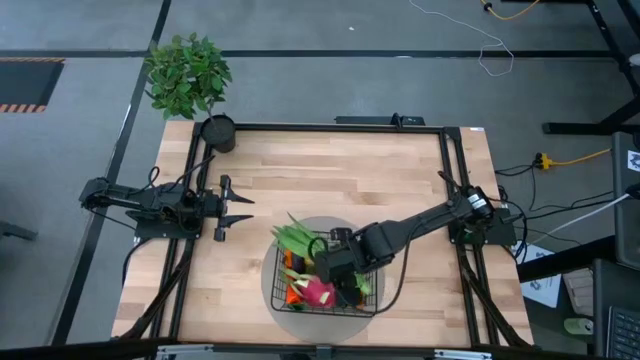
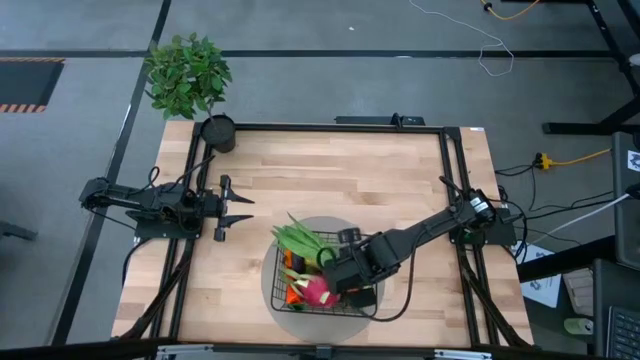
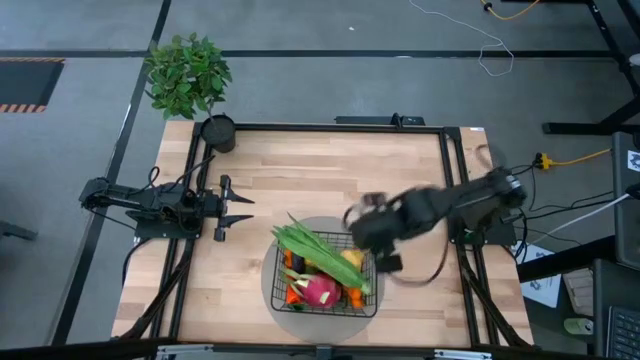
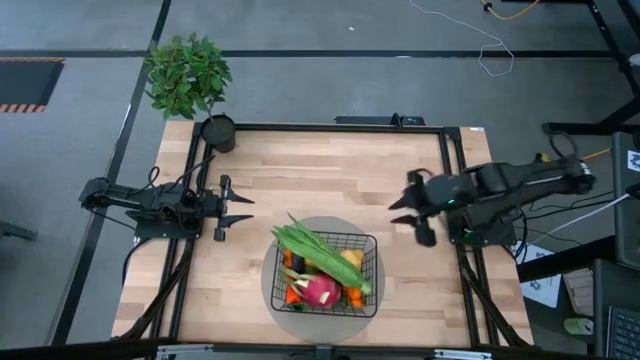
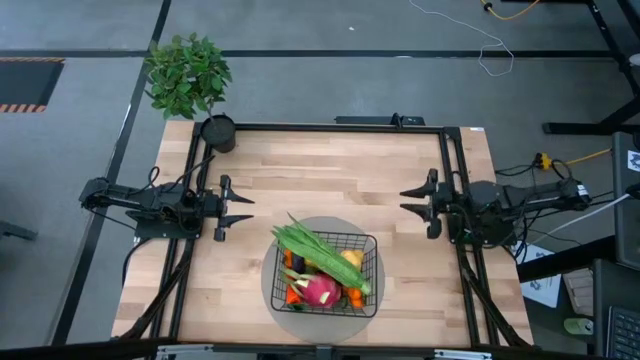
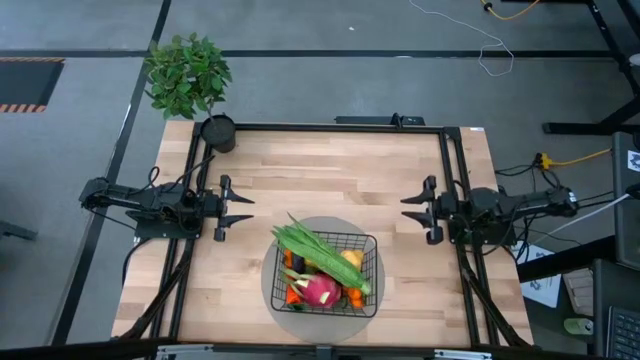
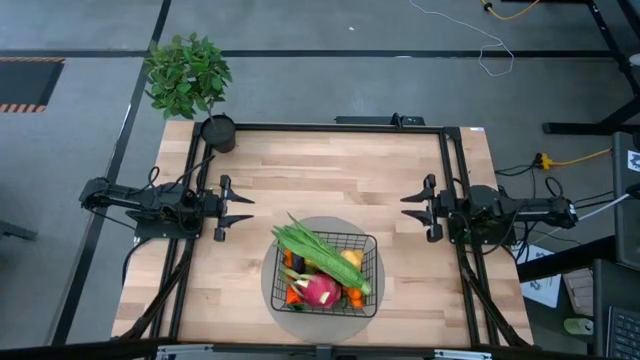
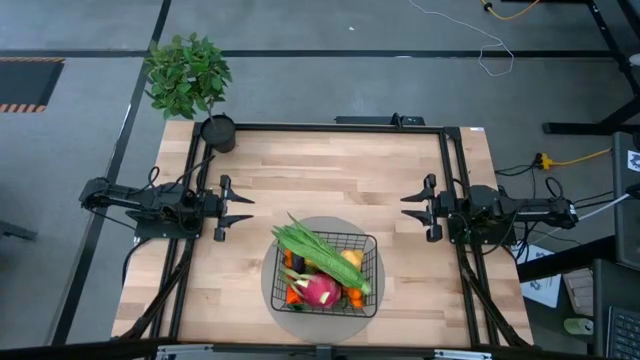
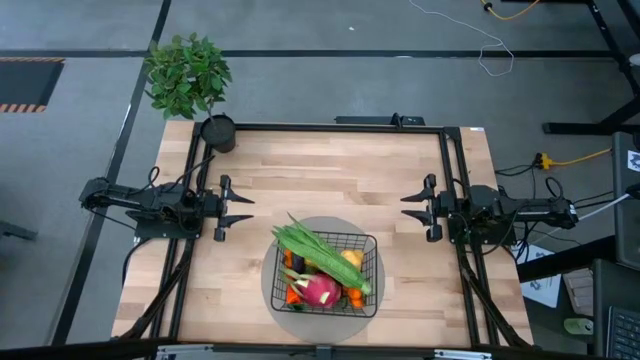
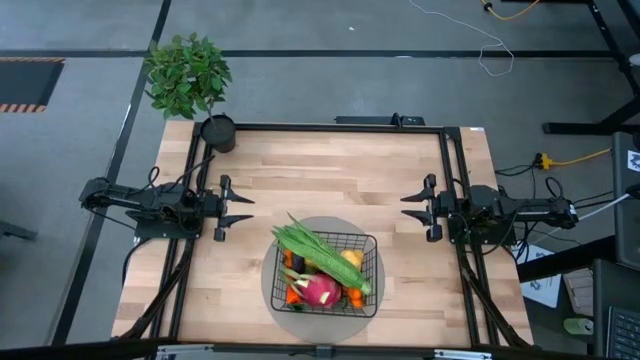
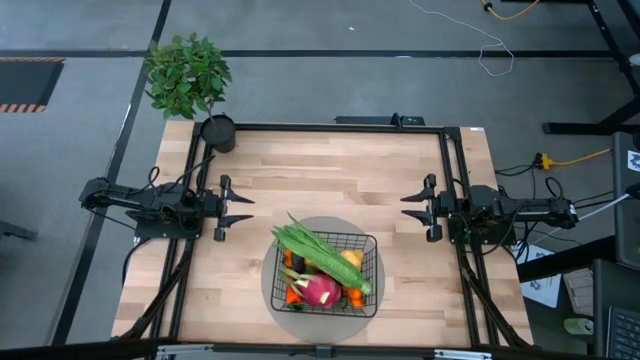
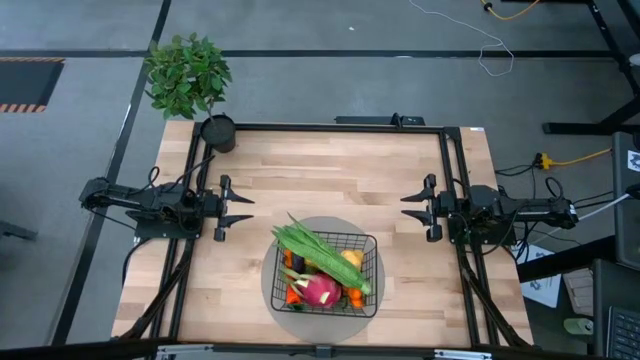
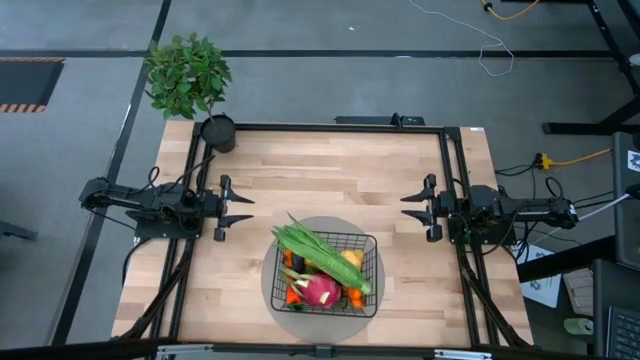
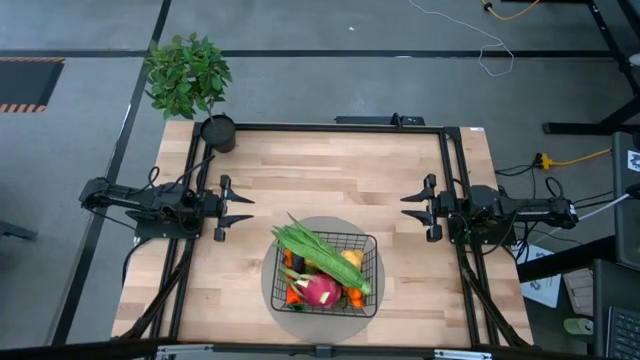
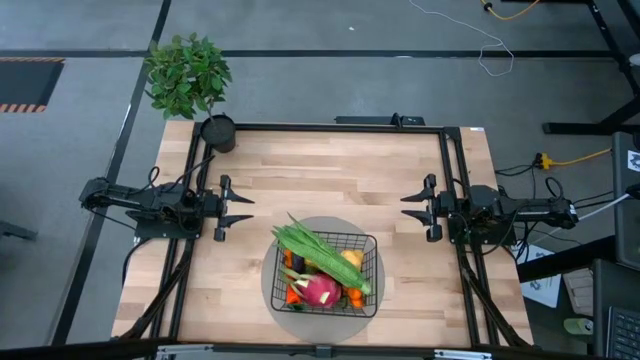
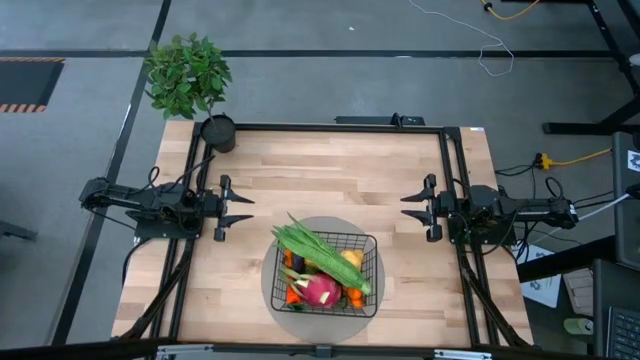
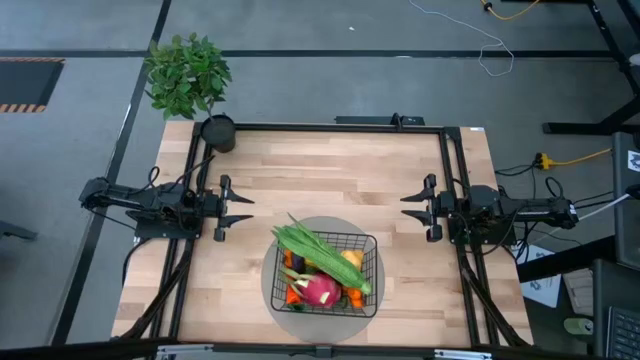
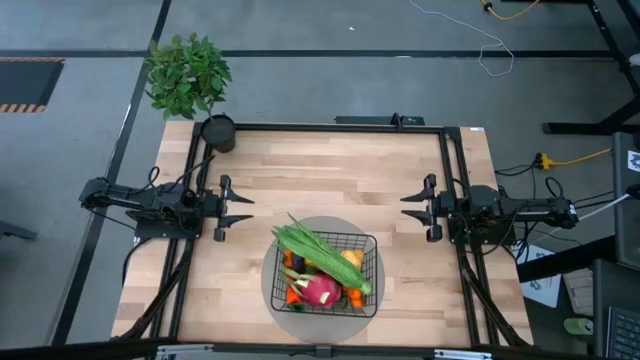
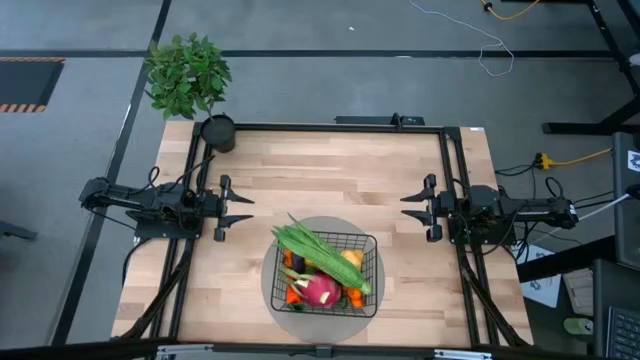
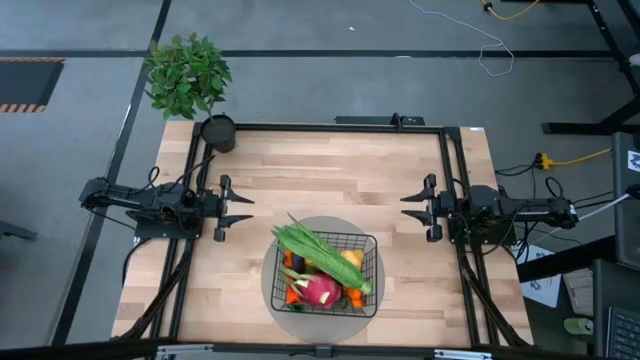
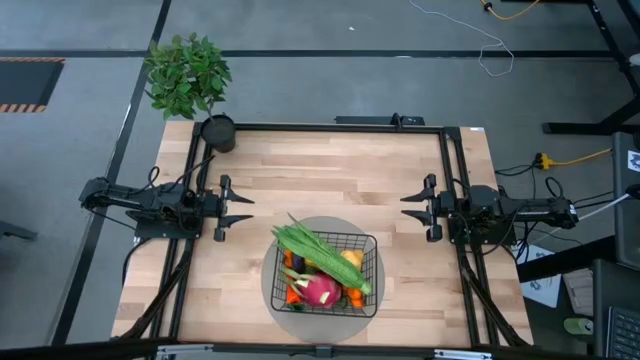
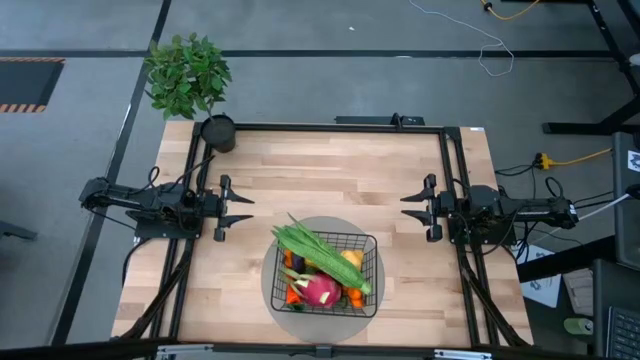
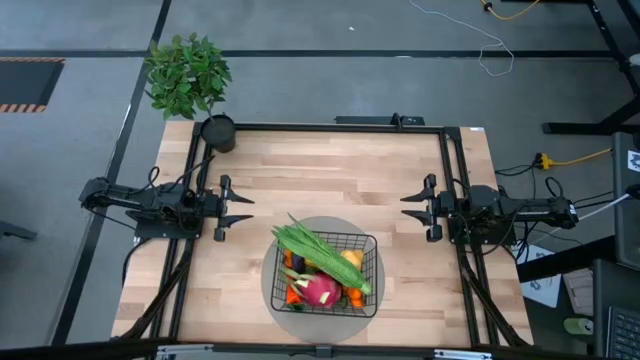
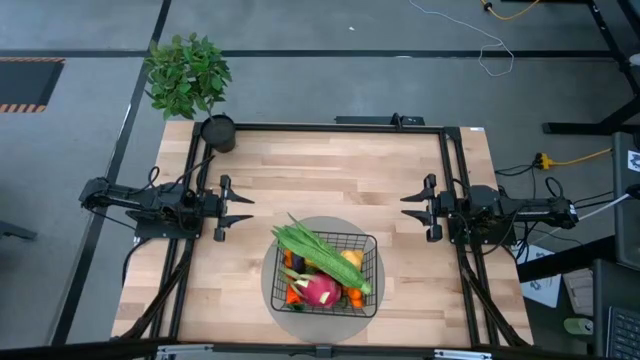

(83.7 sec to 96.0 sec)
Task: Build produce basket
Return to Home Position

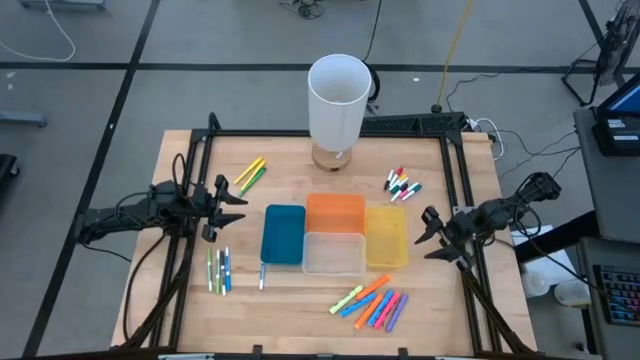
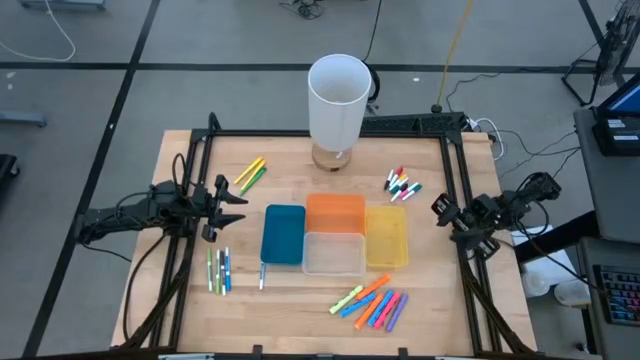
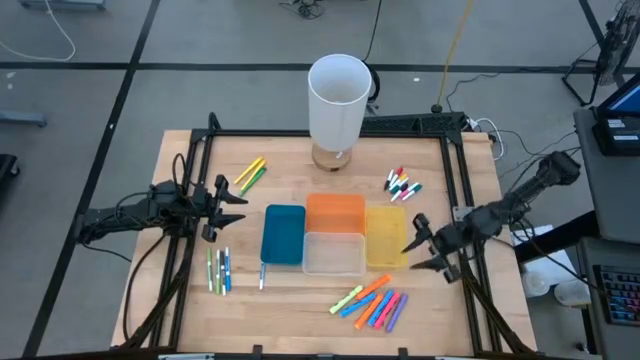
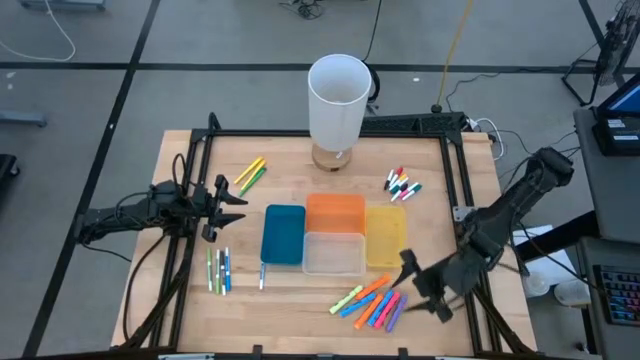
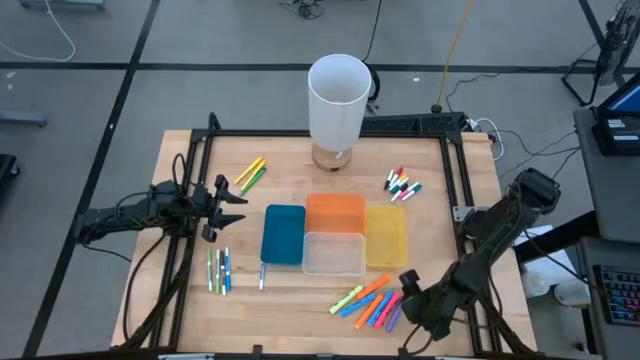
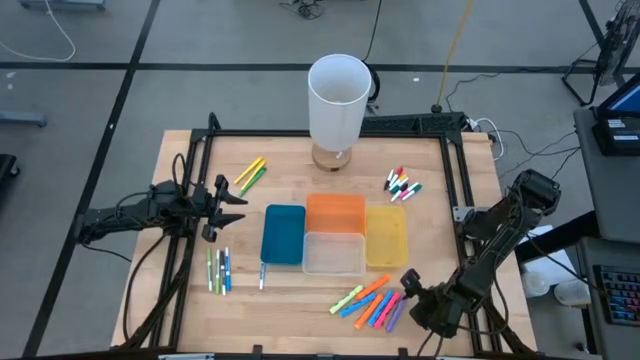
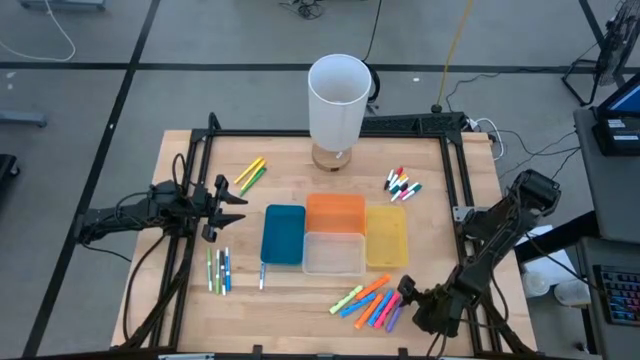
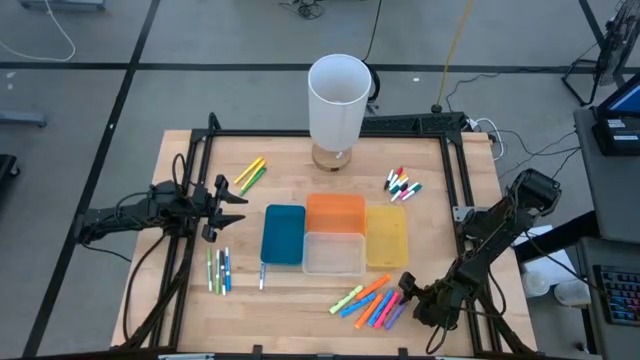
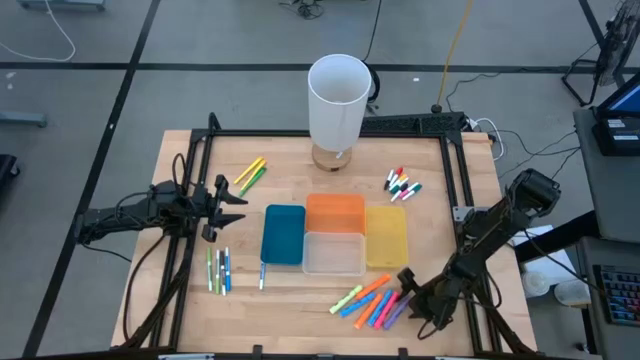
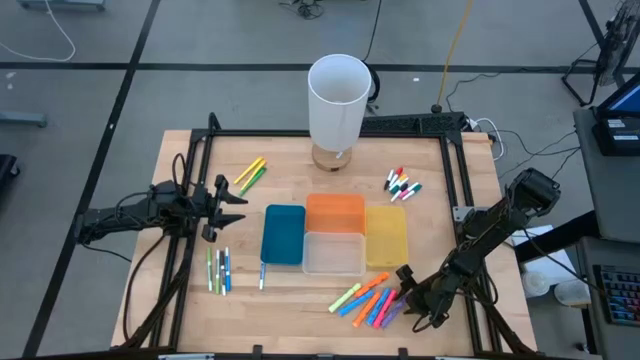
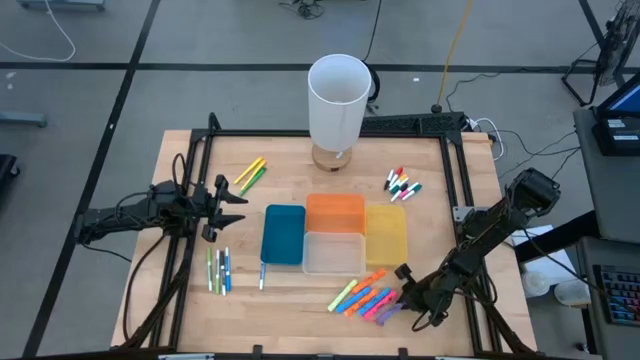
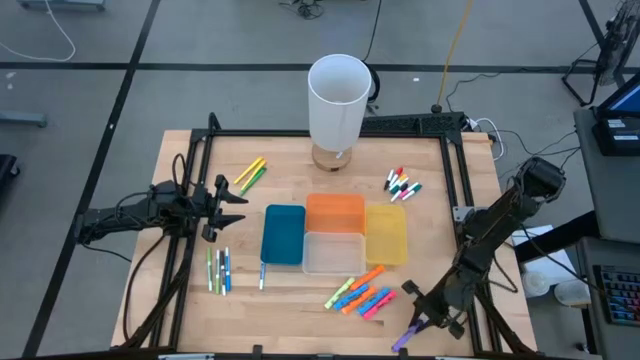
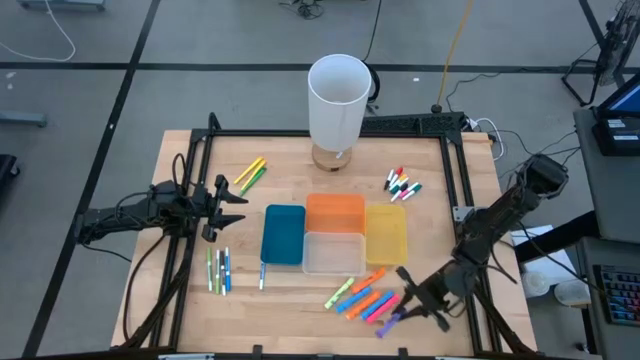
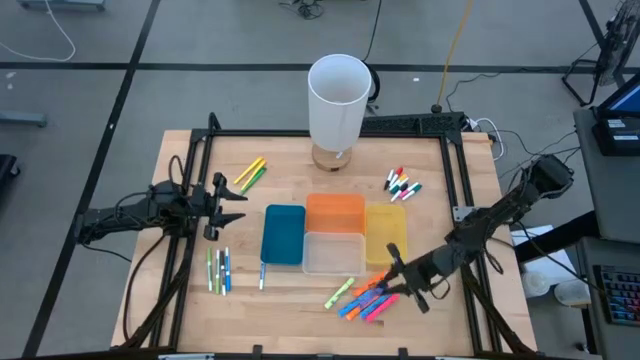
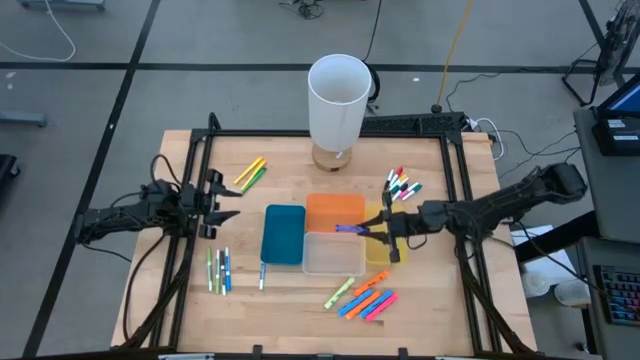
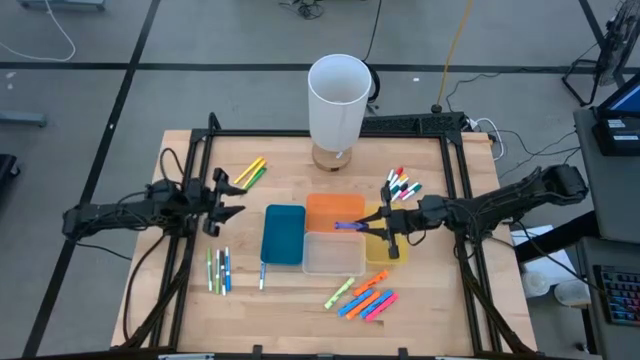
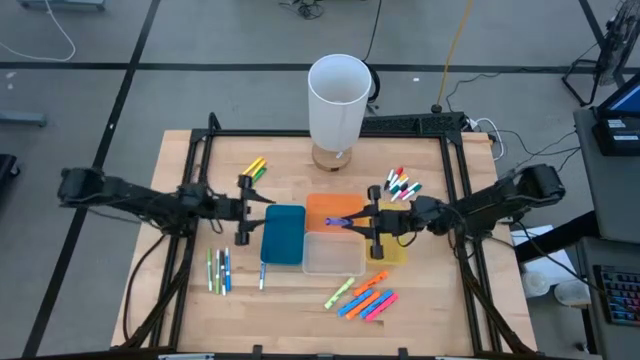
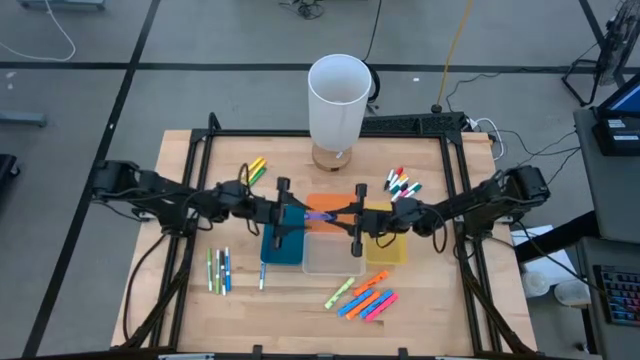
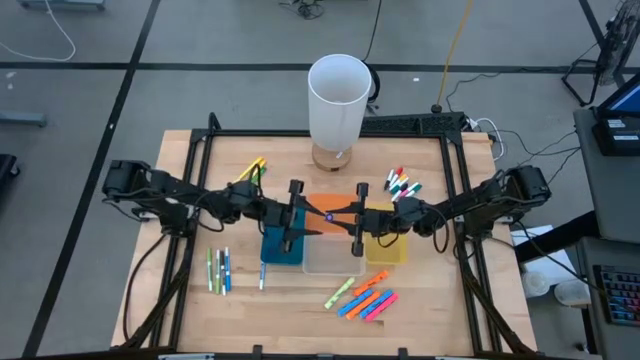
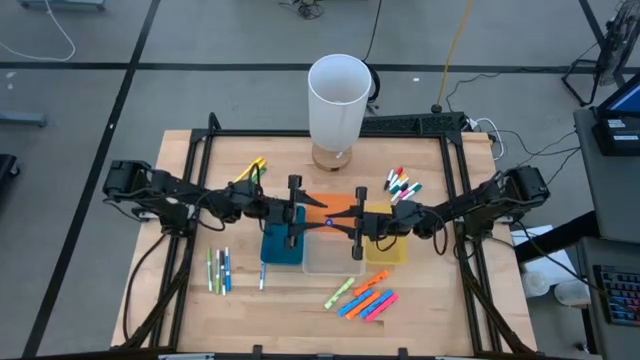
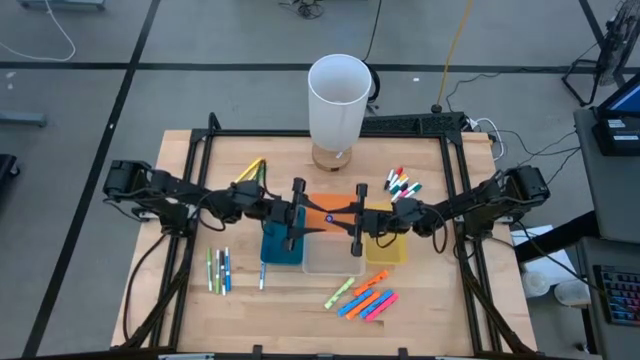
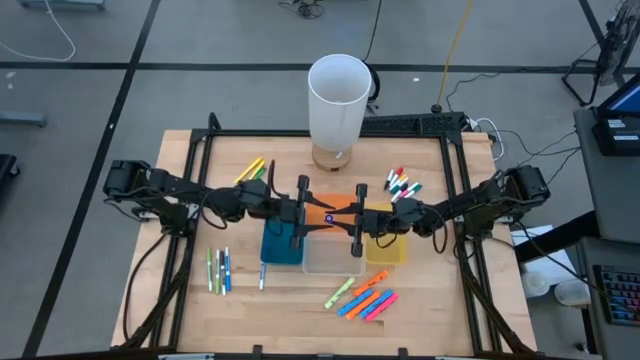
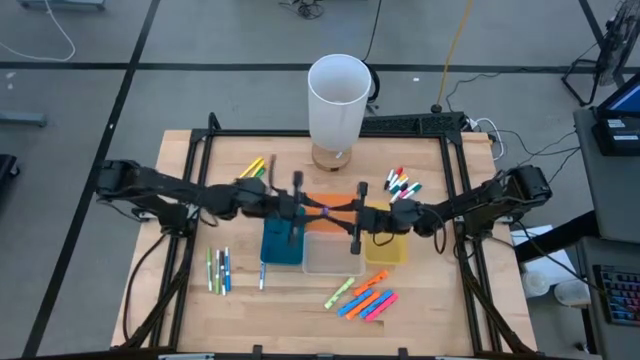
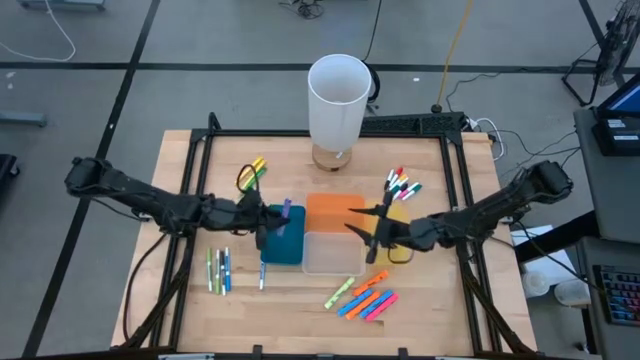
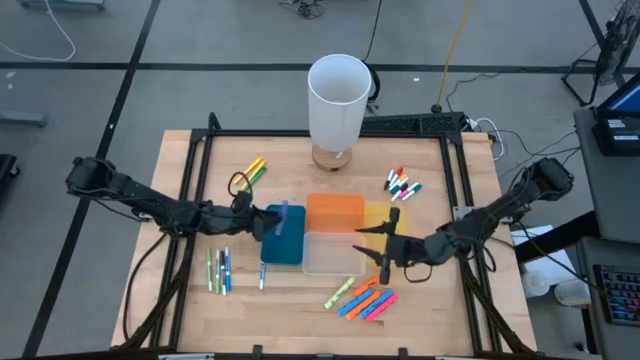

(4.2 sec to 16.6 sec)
Task: Pick & Place Markers
Put the large purple highlighter pen into the blue bin
